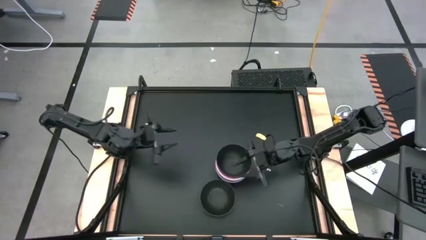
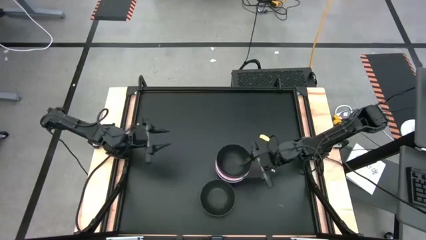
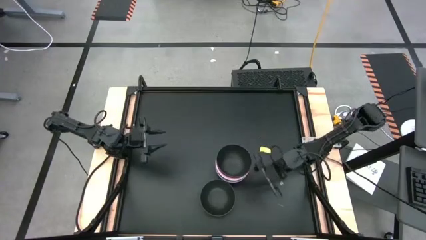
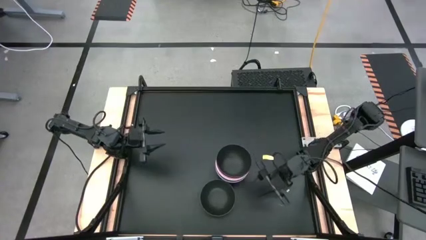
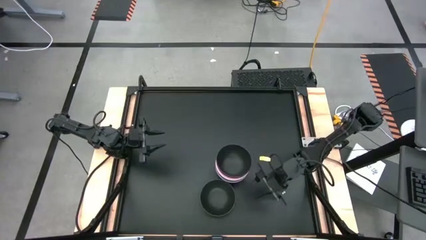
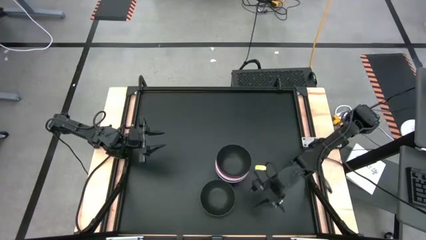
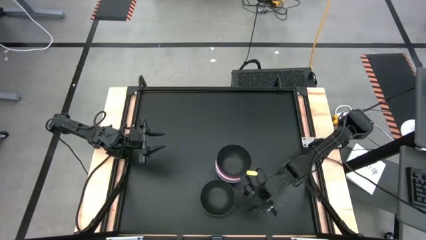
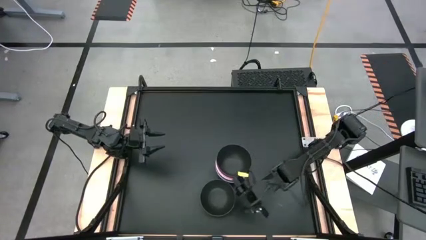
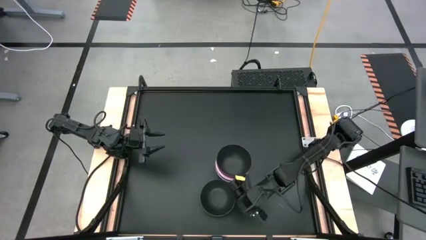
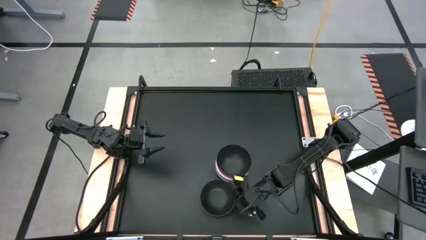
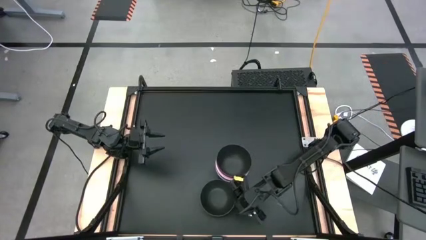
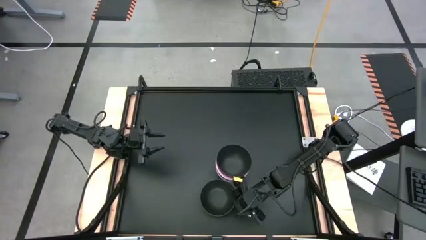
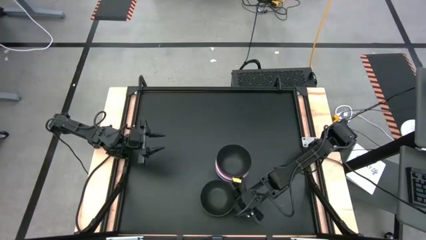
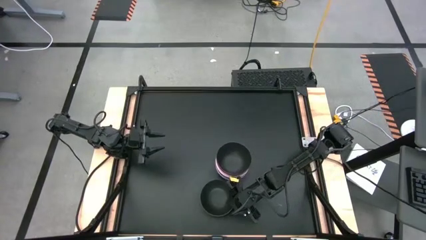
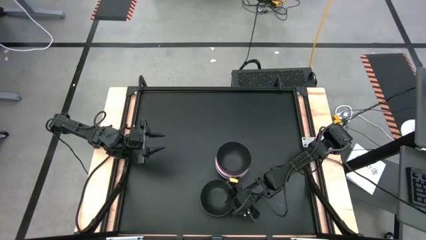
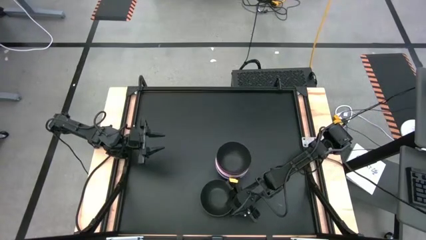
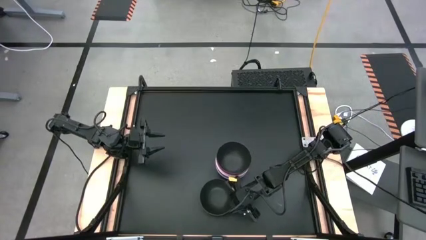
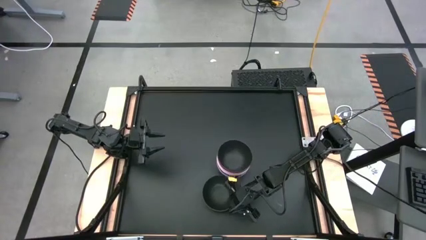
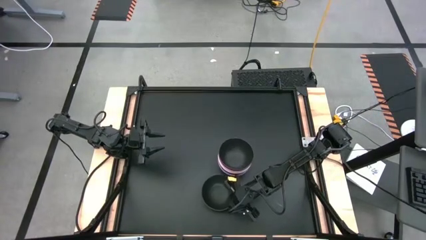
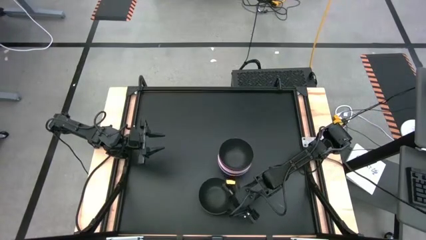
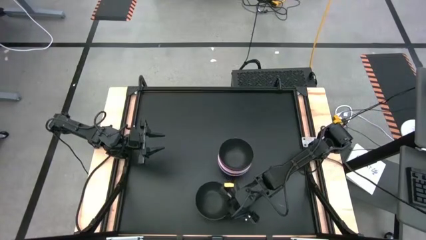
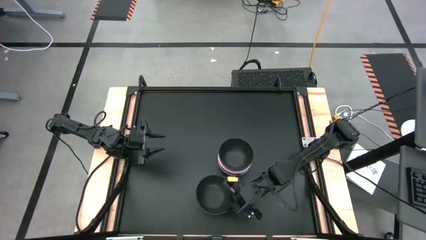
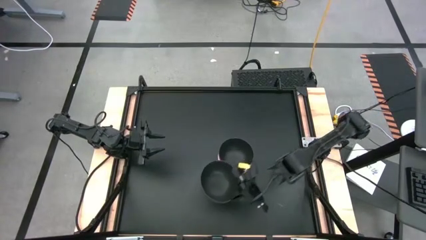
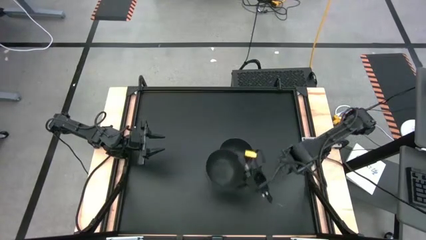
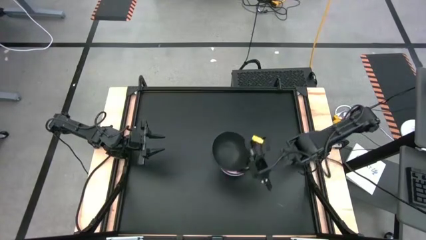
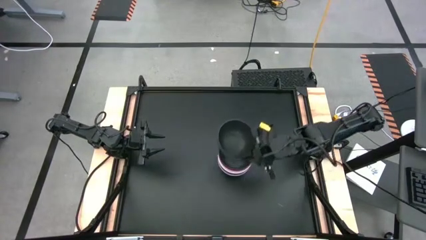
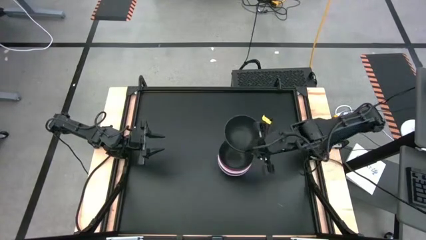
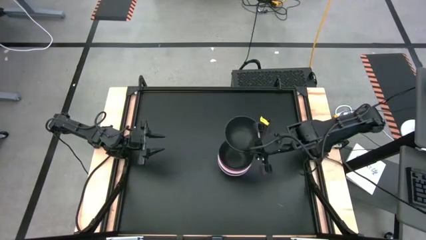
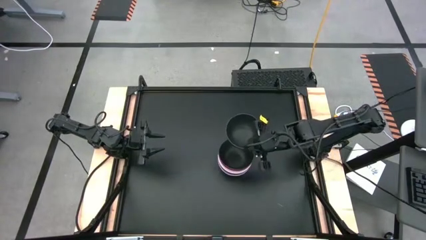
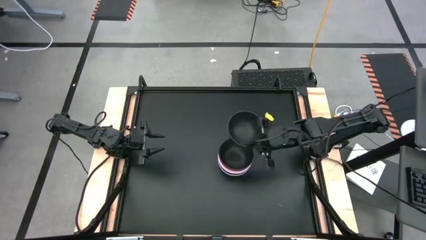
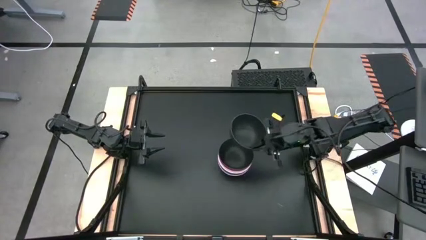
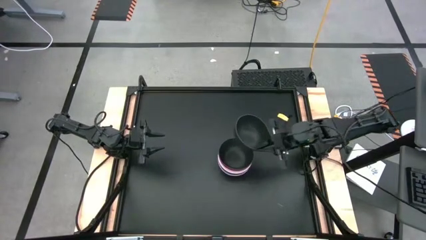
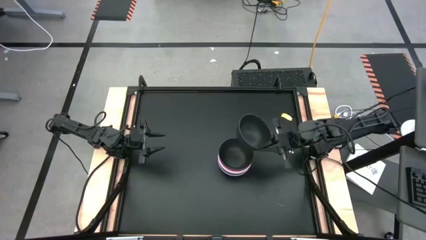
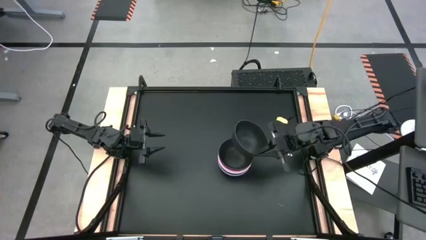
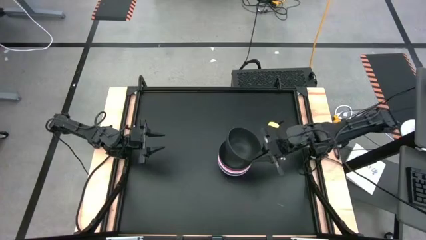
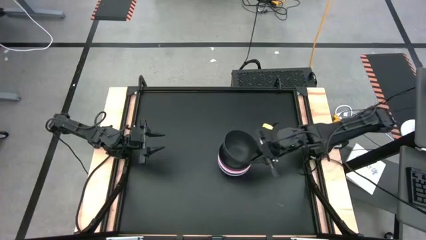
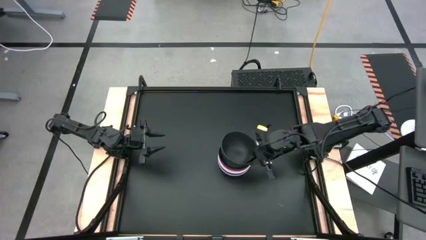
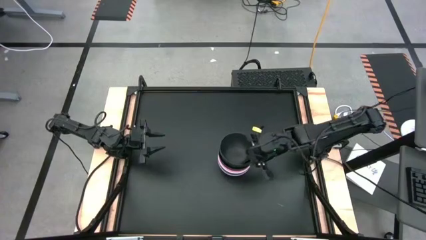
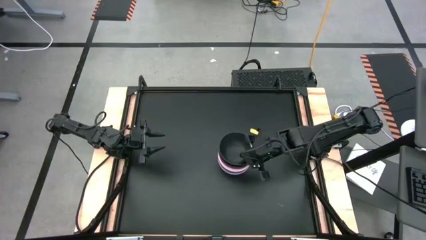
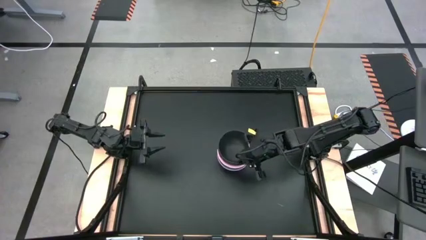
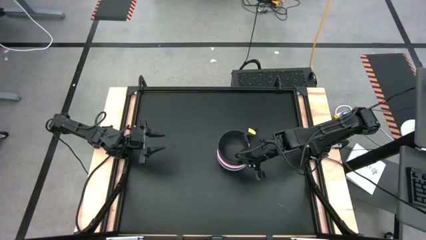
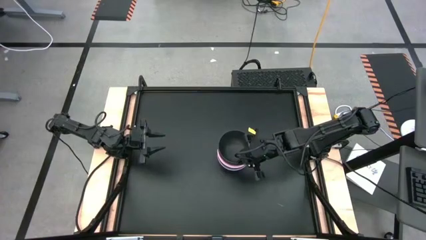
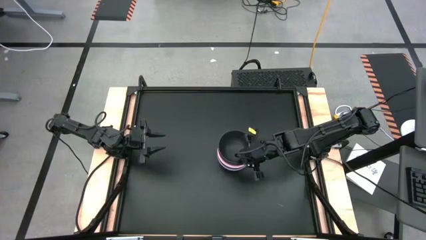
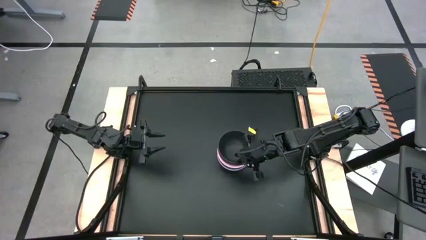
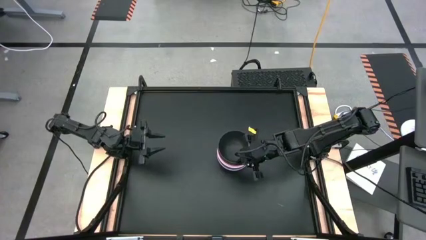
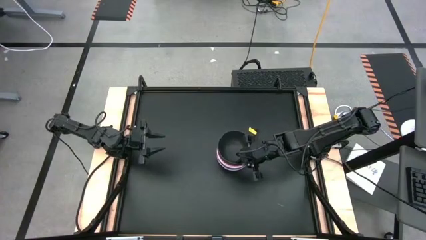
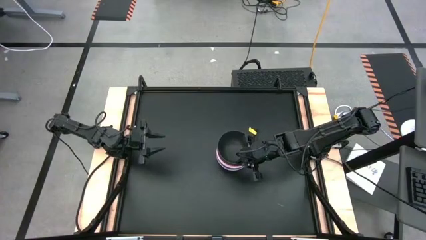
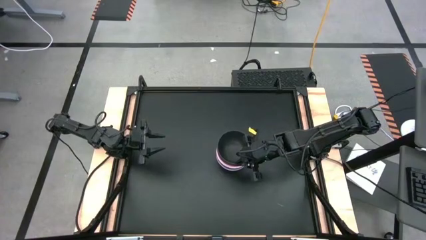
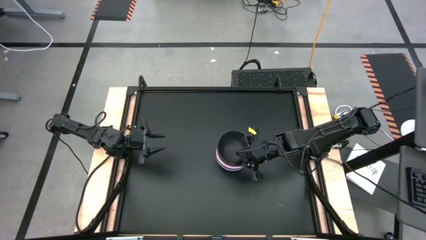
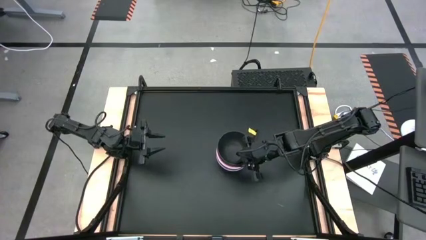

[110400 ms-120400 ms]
Task: Nest bowls inside each other
Stack the black bowl on top of the black bowl

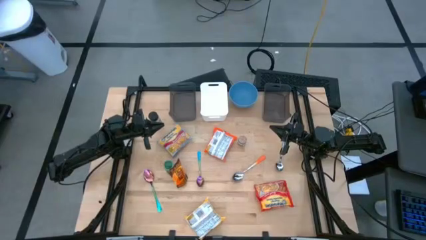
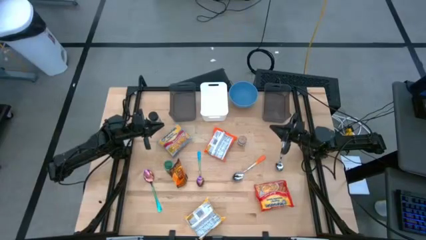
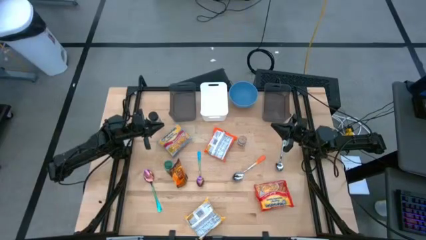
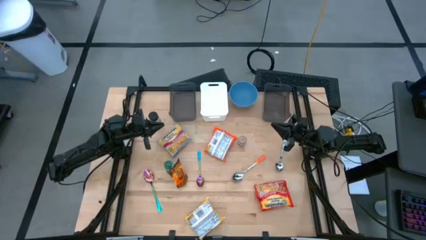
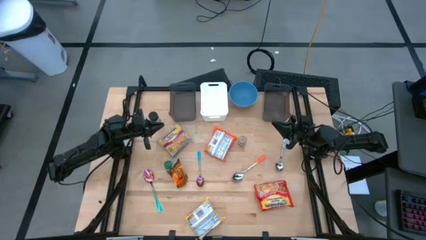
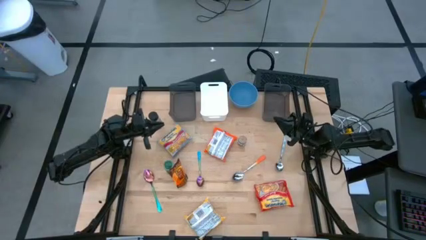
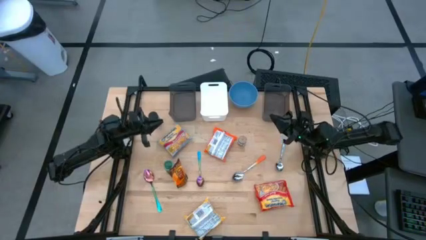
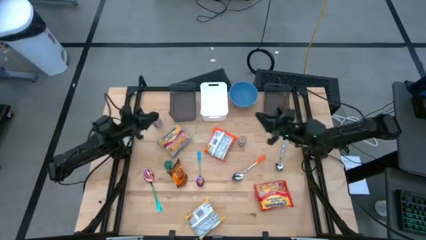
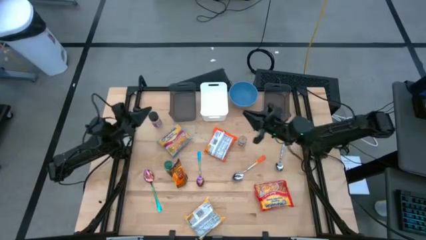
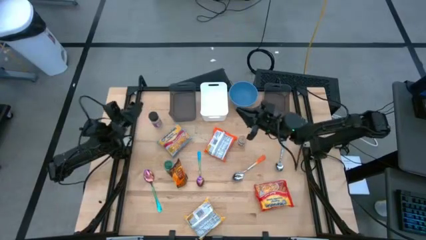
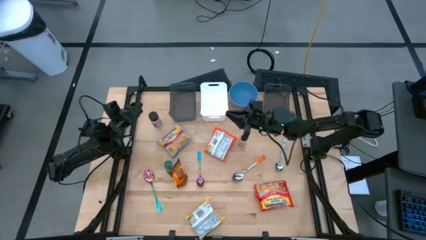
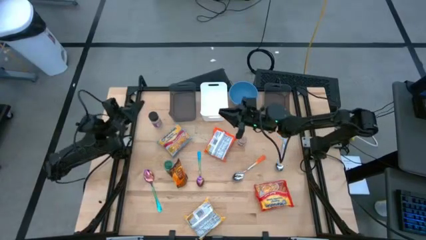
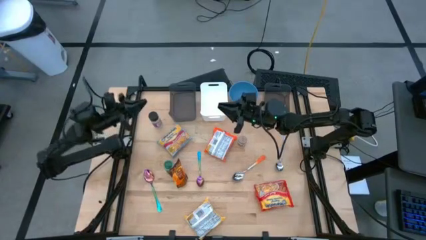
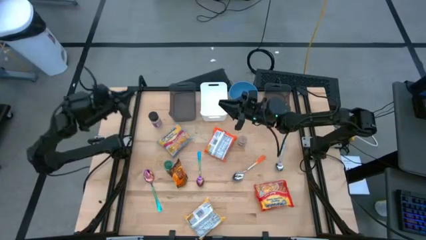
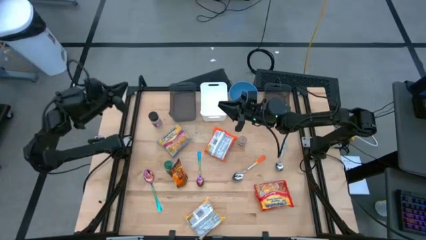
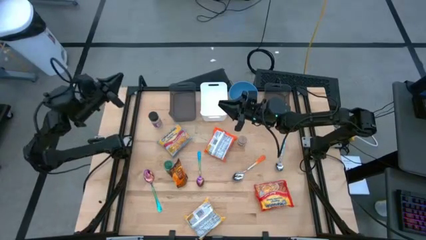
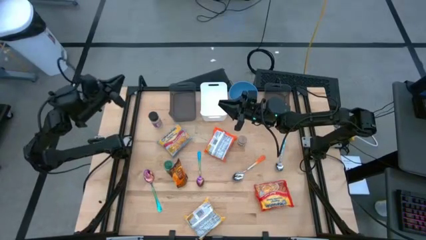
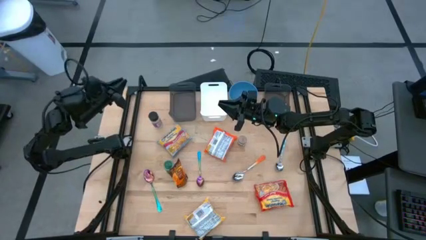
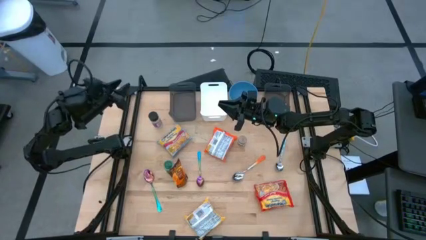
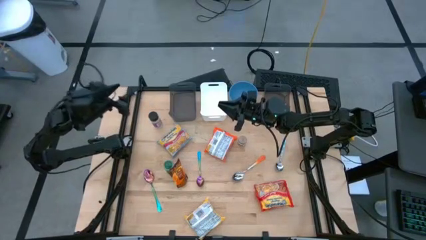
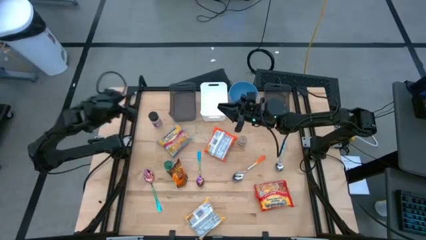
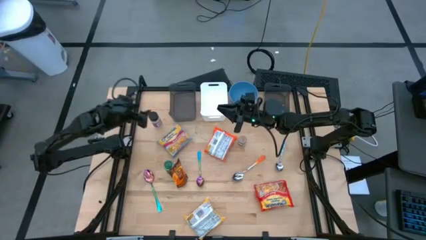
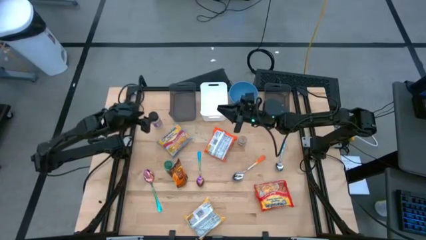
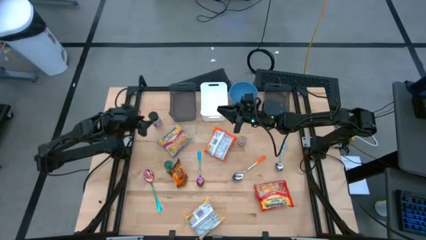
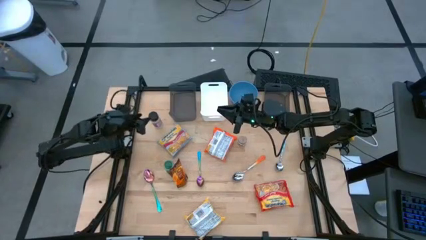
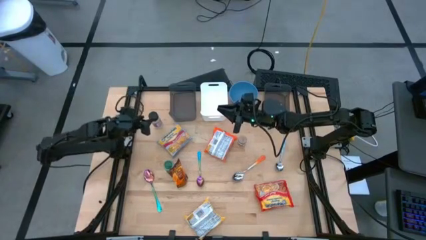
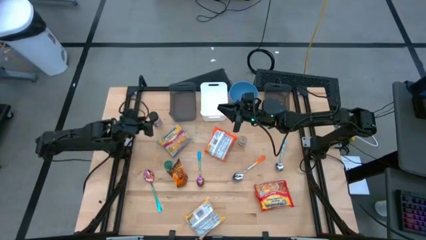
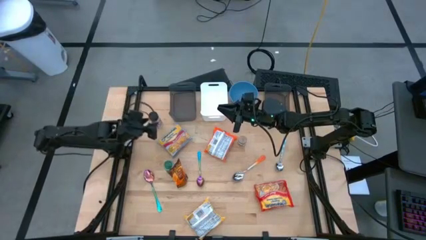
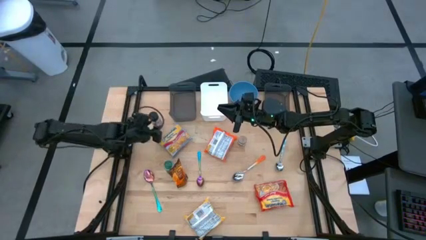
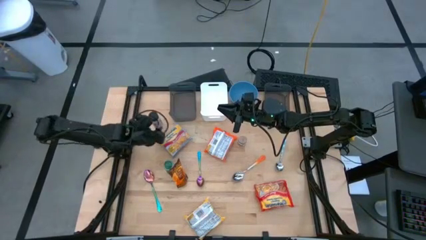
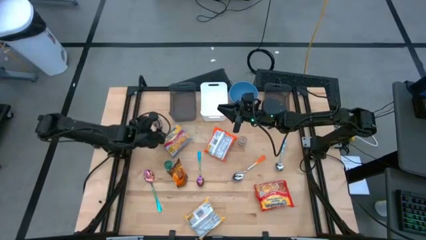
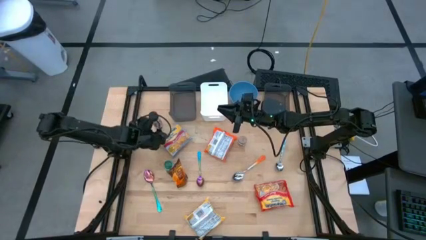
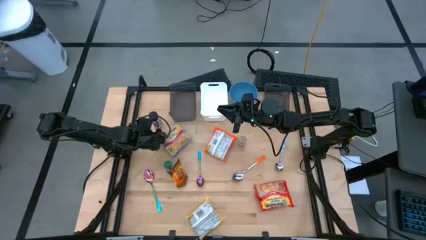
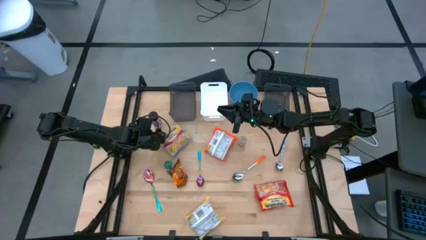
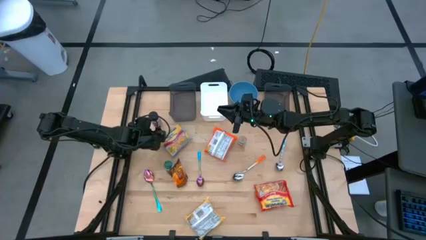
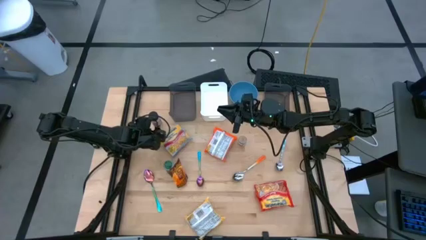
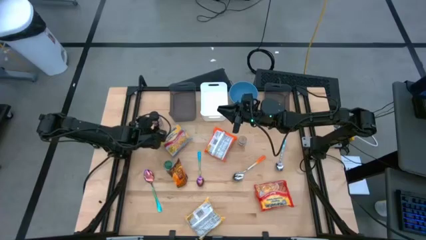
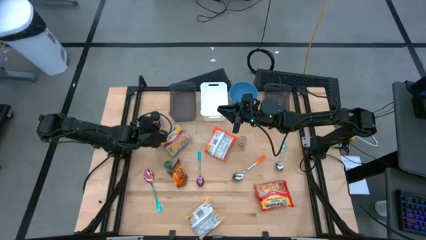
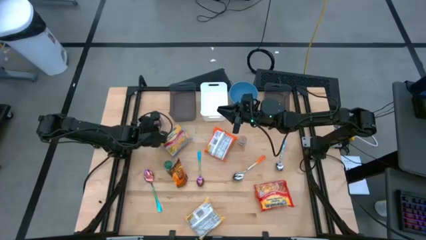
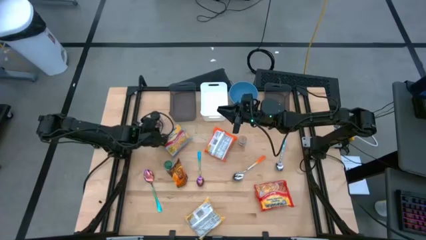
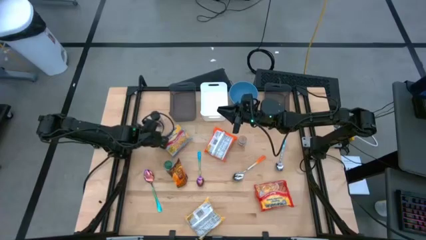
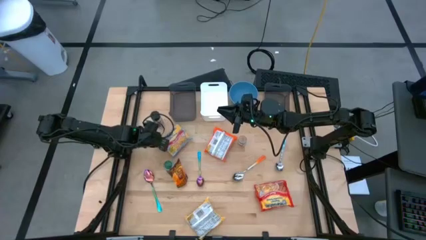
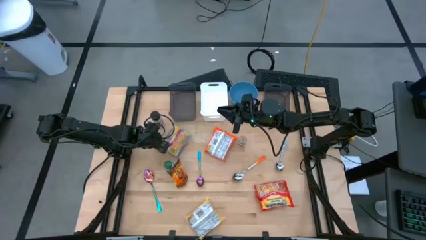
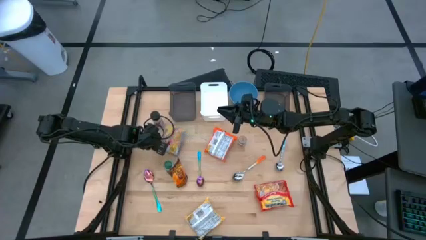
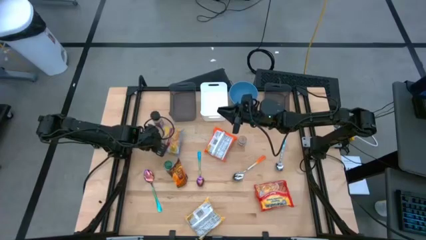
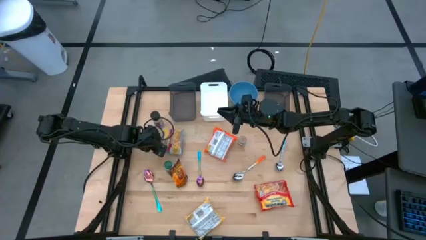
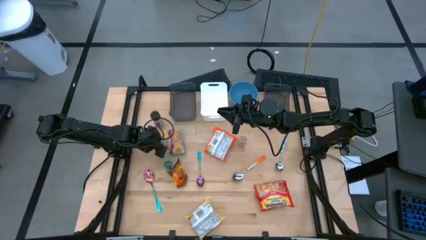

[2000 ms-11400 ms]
Task: Pick & Place Food Item
Put the black spice bottle into the right black bin
